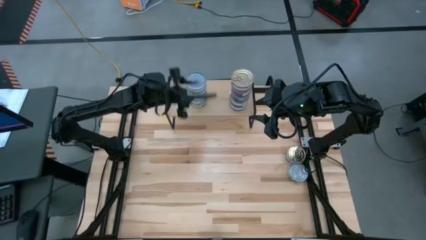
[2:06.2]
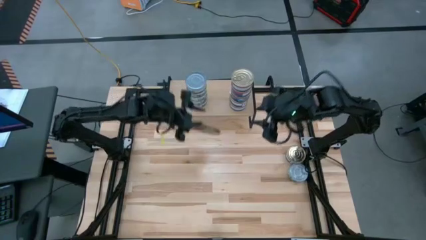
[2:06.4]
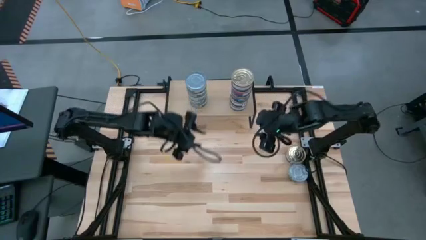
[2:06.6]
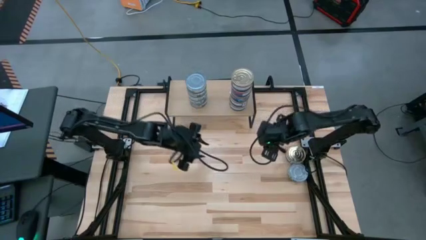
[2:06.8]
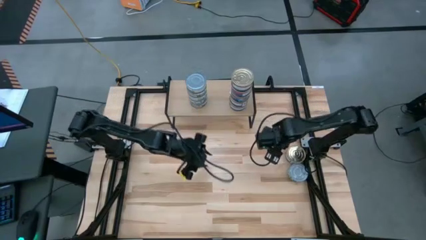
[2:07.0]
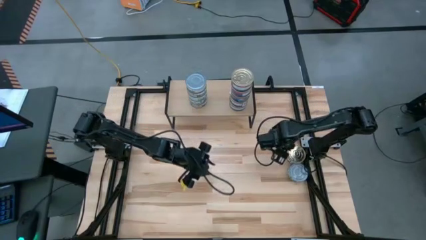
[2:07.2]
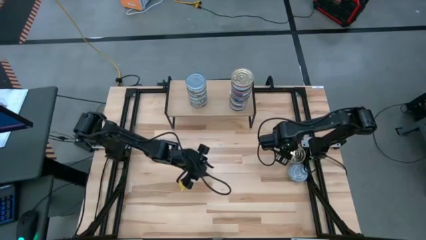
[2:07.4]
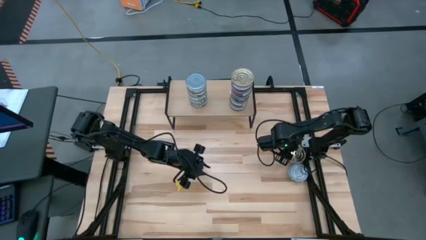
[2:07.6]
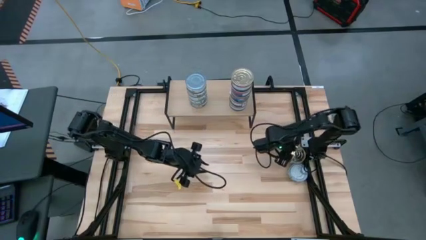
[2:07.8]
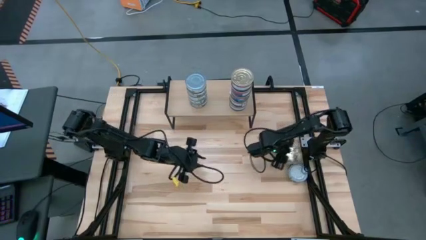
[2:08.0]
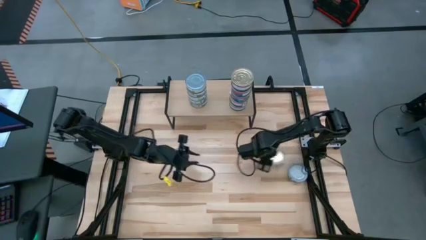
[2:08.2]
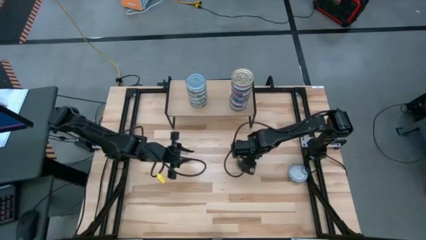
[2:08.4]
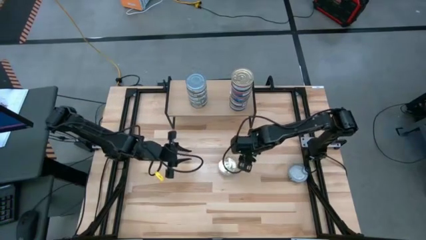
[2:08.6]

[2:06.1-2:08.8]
Task: Stack canned seafood by type on shelf
Move the pink and blue tuna can to the center of the table

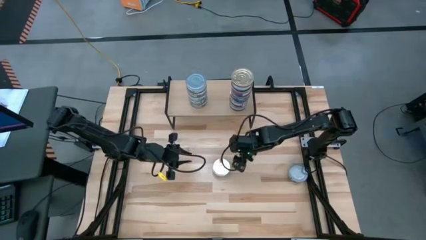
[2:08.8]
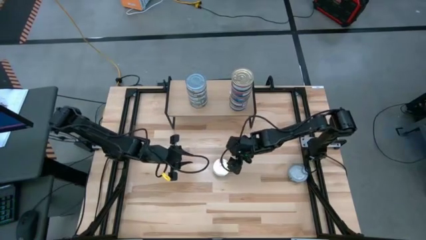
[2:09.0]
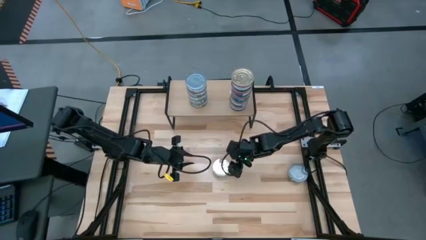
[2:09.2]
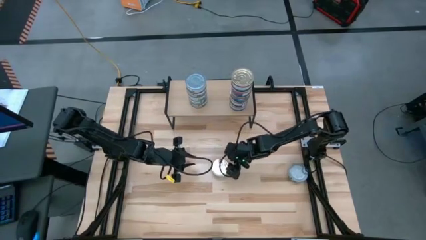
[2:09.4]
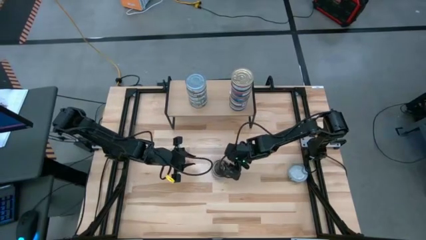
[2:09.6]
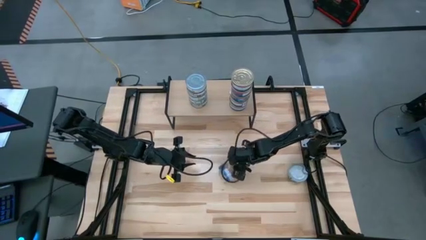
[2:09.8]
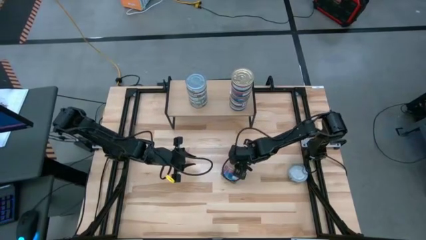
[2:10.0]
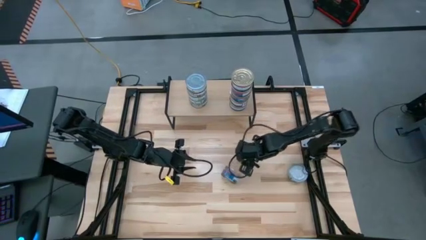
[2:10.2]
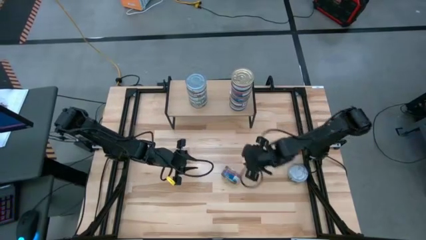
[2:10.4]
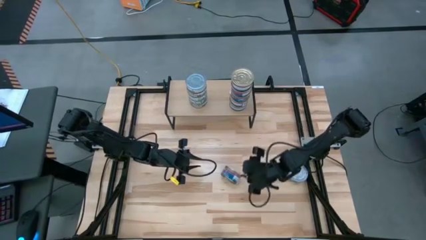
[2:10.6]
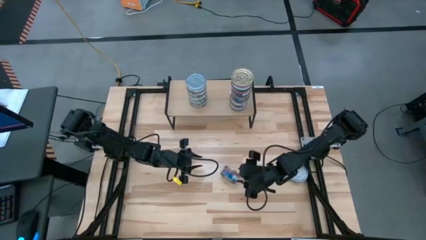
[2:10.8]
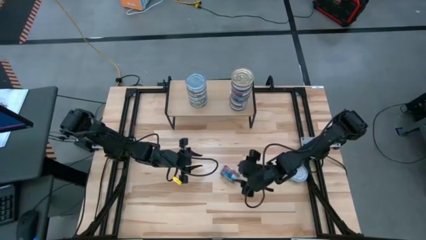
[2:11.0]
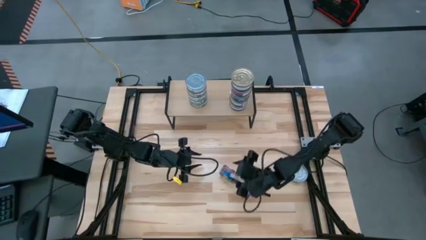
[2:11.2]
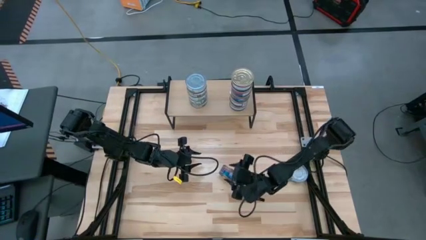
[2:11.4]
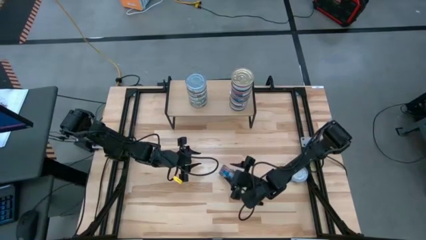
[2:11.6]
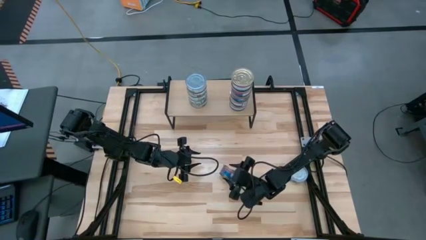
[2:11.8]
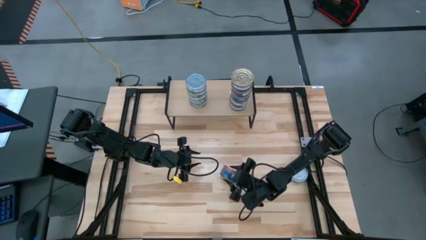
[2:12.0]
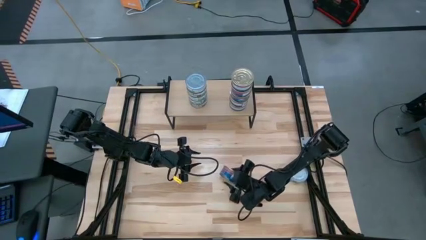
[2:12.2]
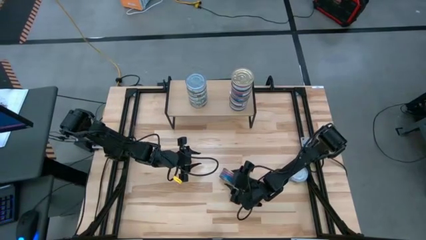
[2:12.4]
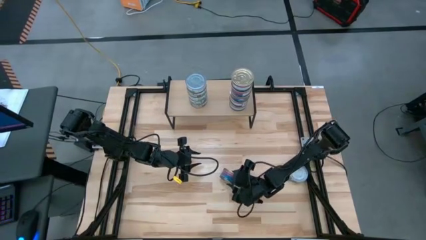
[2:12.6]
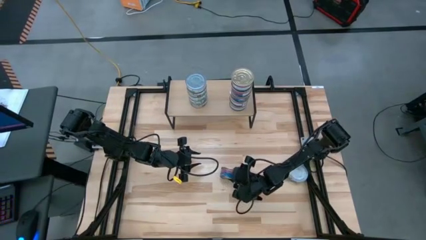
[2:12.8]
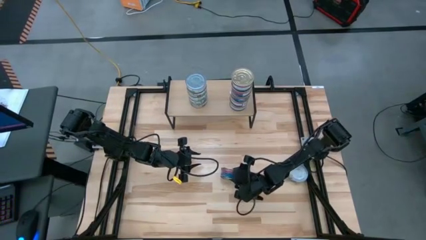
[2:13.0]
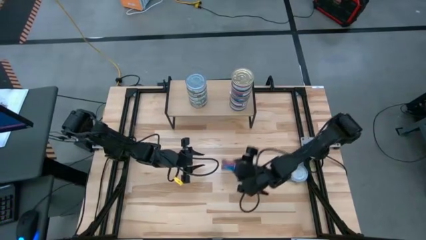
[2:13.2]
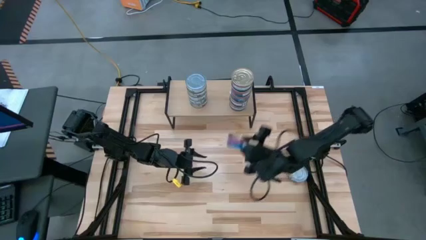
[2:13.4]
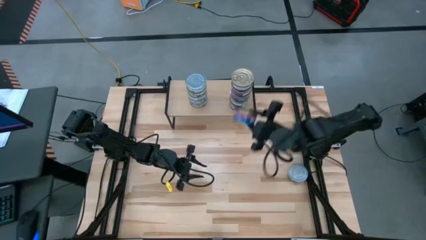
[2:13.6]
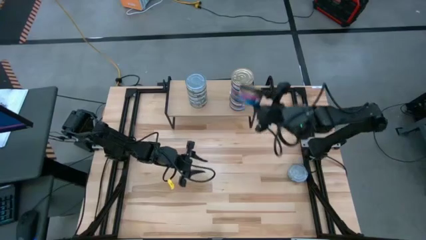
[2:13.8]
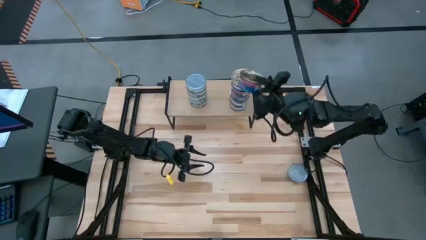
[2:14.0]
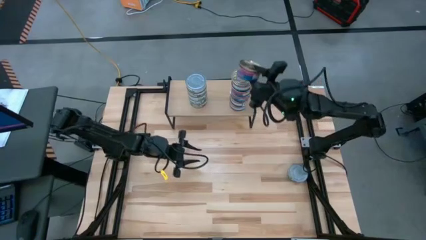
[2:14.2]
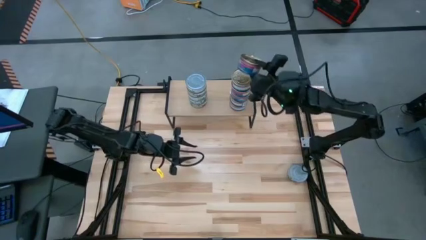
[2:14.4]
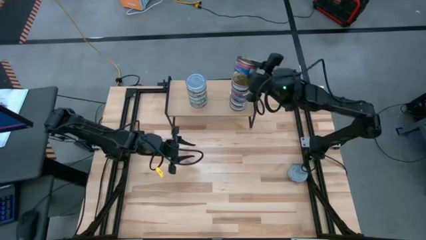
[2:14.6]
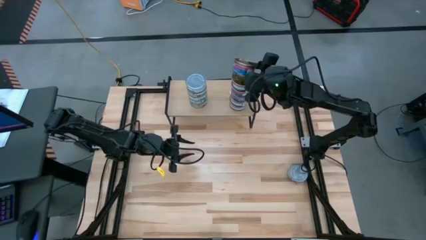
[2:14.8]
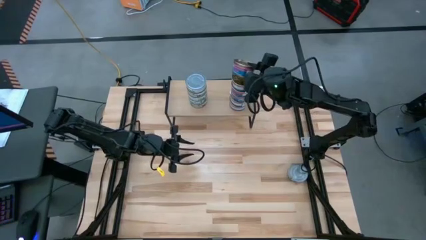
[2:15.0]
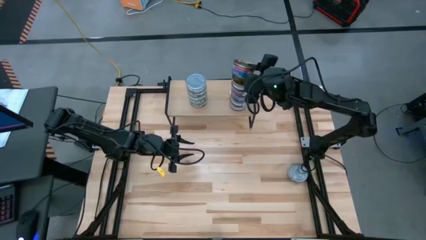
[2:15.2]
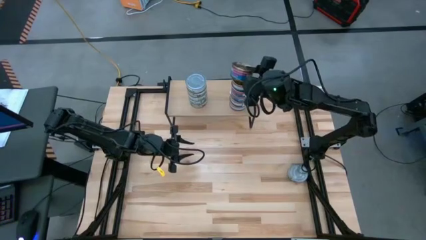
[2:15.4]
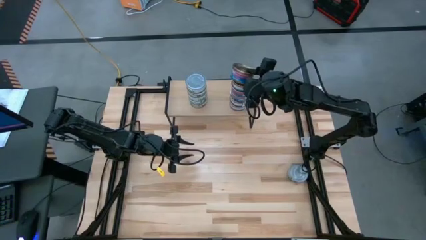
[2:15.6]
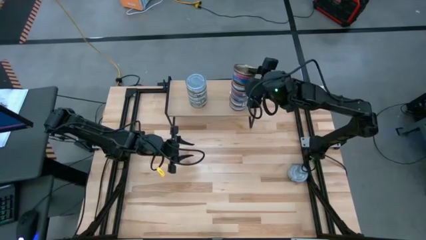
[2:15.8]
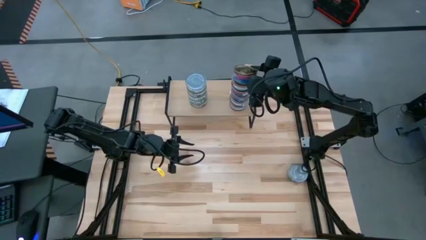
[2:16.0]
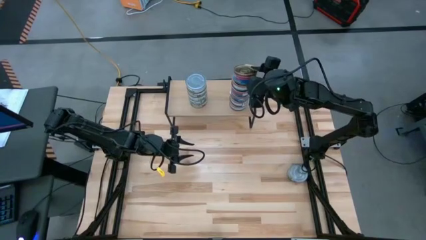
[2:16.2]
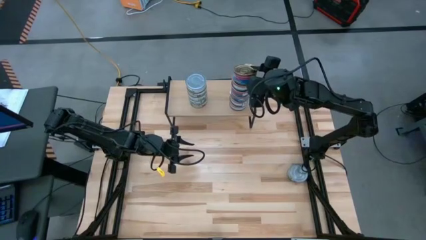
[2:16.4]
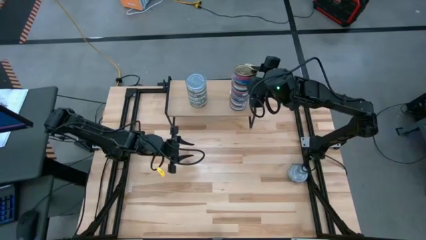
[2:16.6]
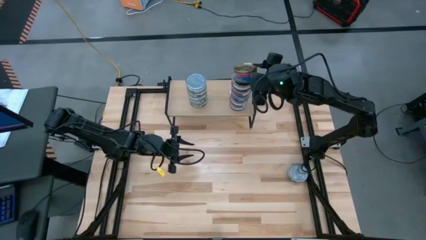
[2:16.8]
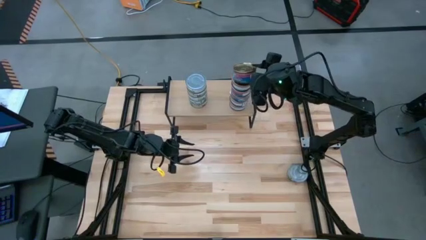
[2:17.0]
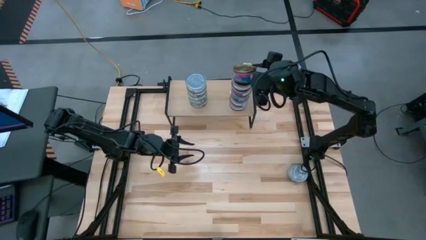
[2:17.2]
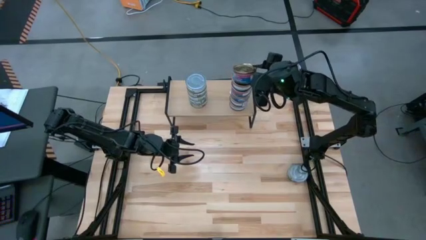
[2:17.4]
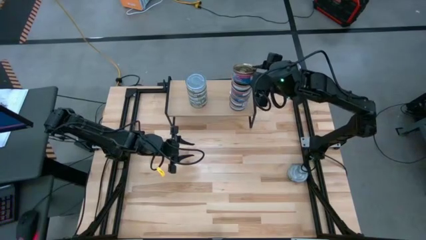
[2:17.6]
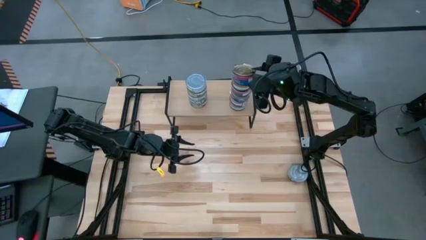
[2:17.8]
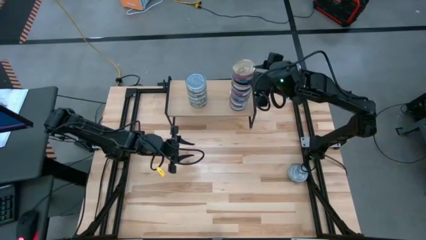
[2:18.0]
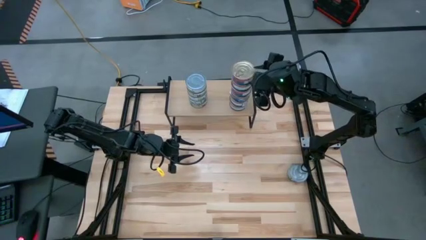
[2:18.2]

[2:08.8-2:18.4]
Stack the pink and blue tuna can on top of the pink and blue tuna can on the shelf

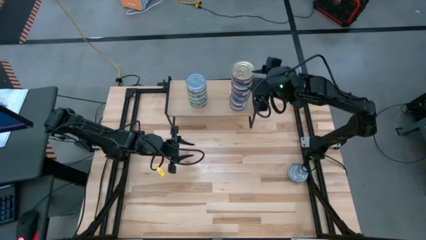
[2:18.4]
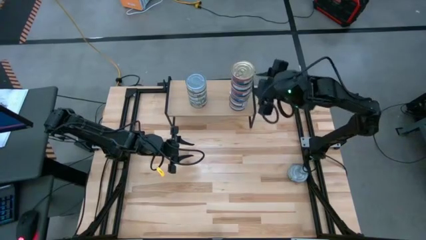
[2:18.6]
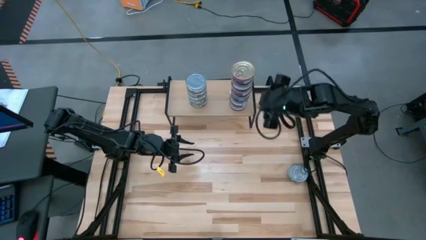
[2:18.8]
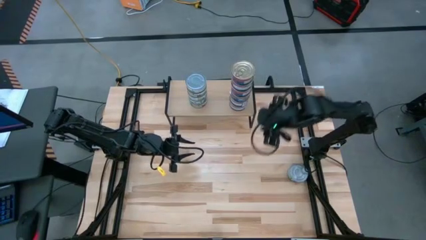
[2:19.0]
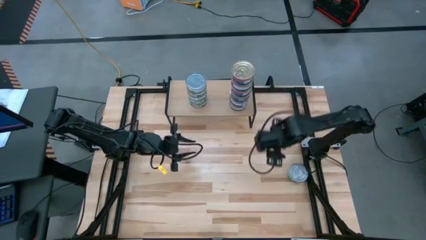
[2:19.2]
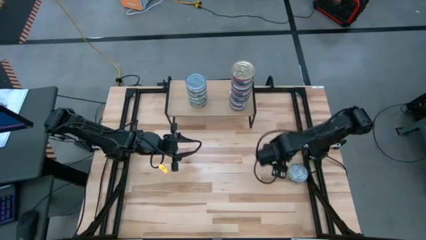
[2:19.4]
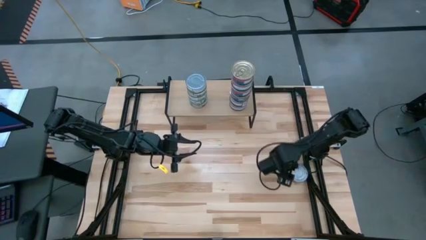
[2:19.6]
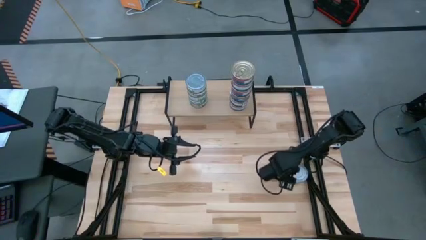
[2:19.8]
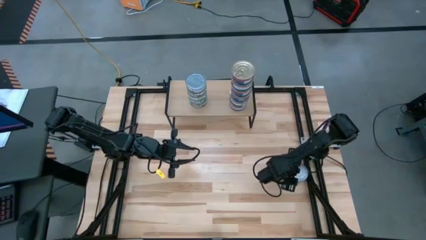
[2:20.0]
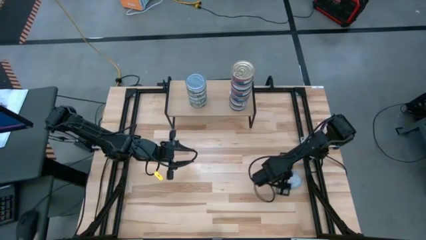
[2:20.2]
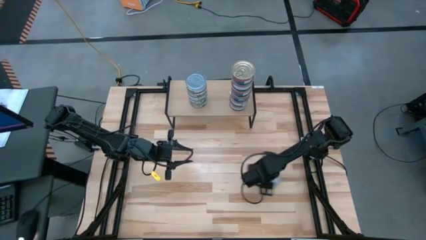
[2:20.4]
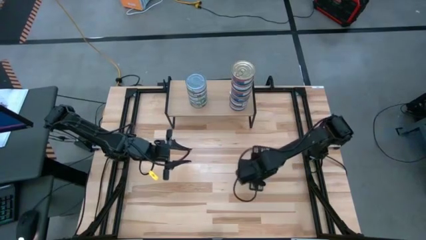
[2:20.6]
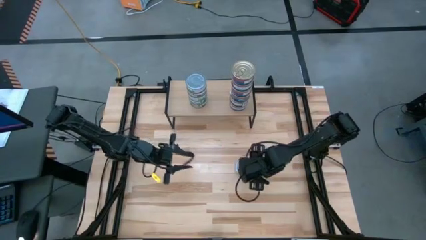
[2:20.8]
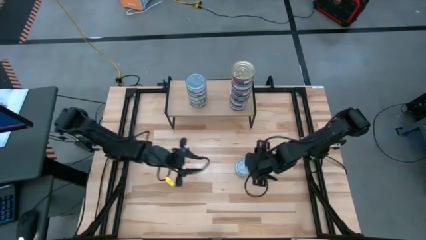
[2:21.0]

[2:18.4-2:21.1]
Move the green tuna can to the center of the table

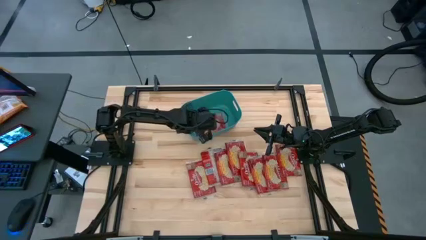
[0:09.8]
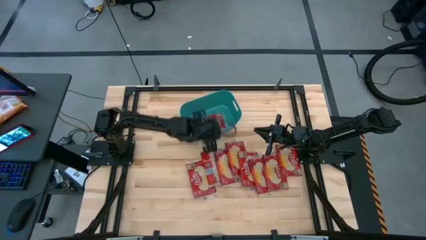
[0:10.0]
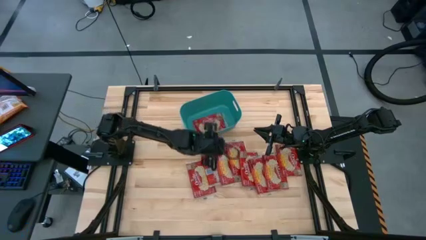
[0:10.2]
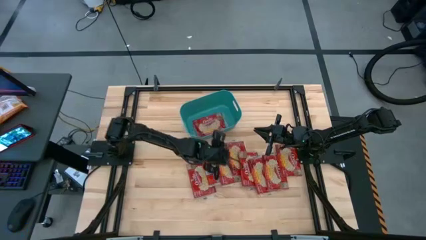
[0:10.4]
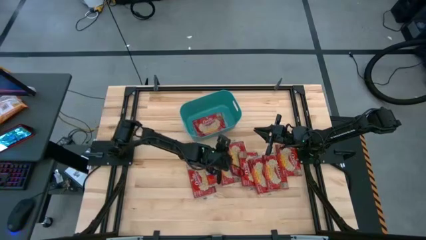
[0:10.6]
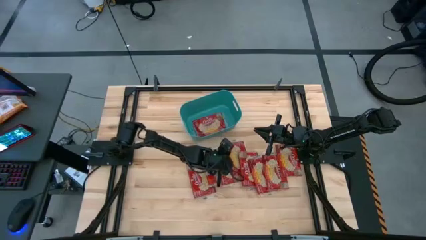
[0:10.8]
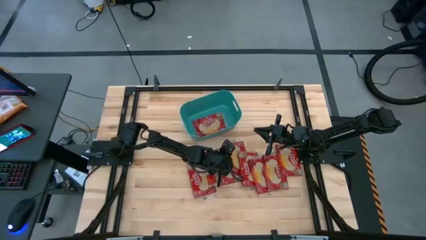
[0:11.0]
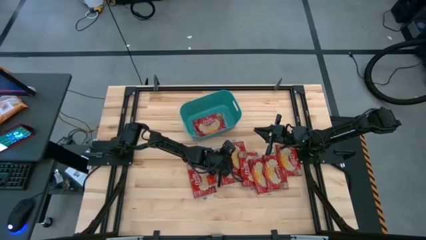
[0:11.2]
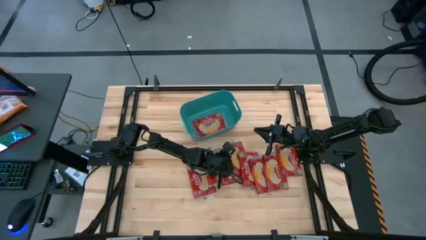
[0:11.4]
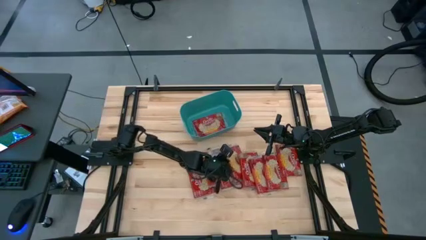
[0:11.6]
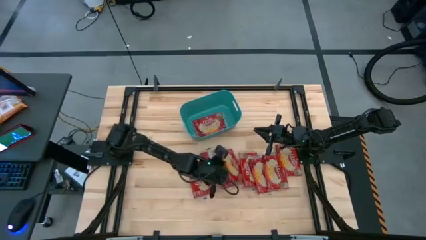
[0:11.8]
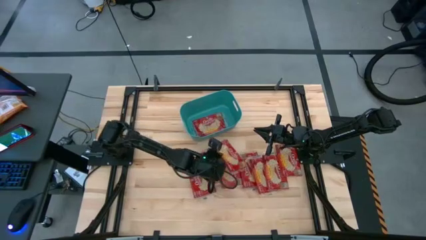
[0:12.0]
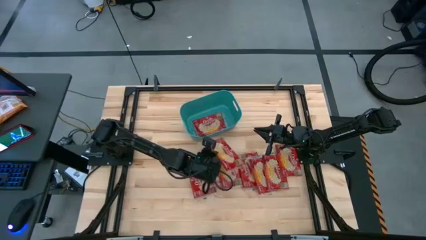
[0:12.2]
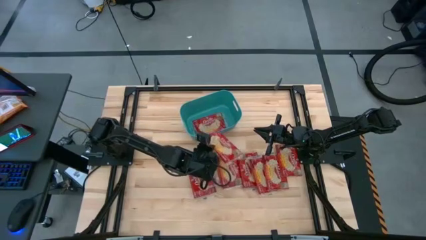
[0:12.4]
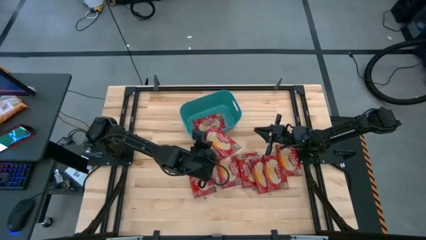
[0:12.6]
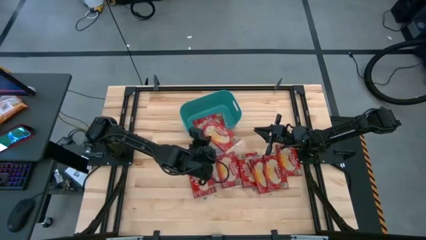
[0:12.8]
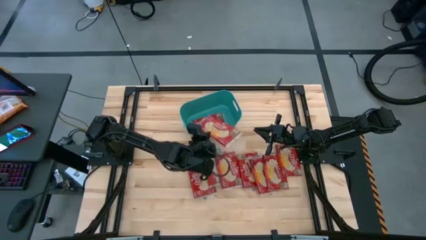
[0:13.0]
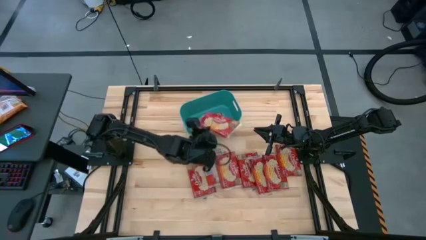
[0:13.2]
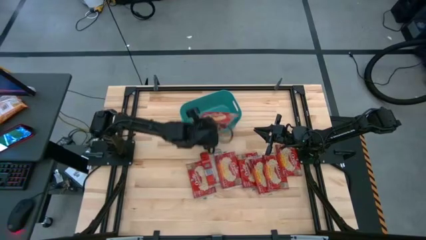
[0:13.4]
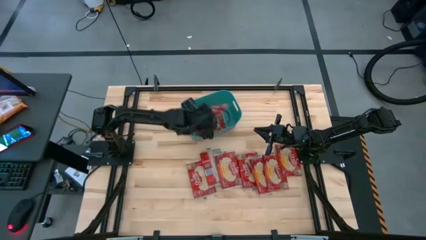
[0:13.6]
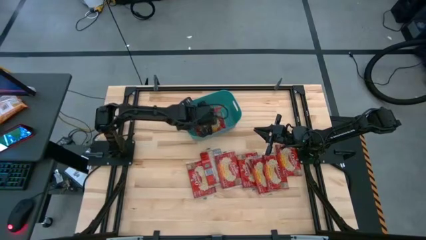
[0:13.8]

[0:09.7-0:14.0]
Task: Sort popcorn bags into baskets
Put the red popcorn bag into the green bin
